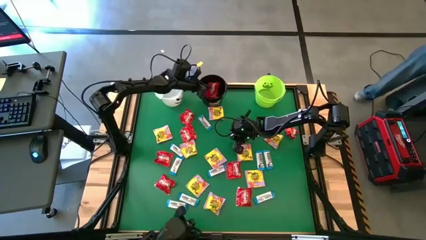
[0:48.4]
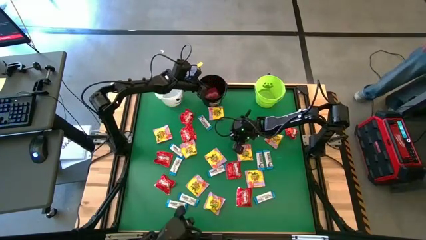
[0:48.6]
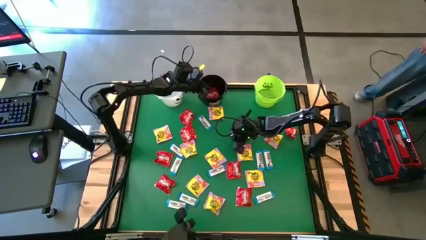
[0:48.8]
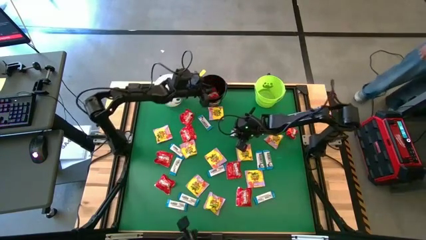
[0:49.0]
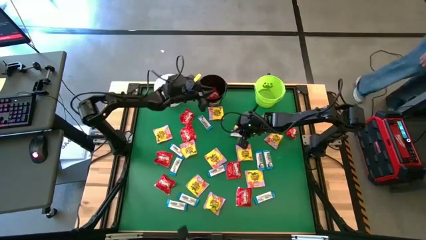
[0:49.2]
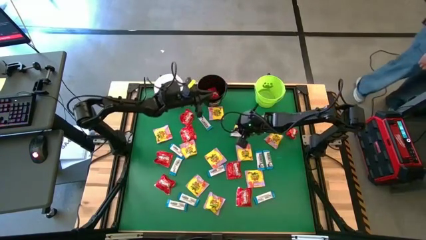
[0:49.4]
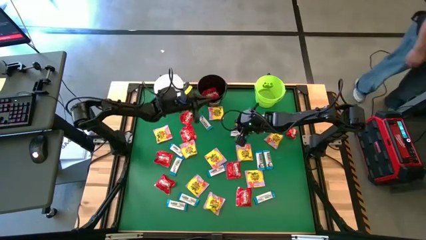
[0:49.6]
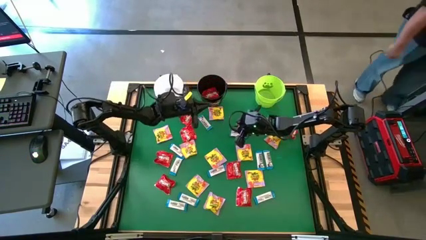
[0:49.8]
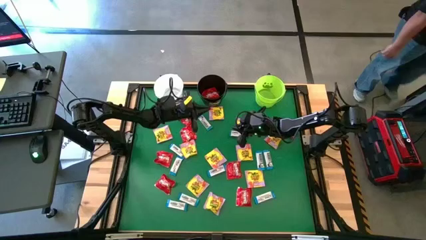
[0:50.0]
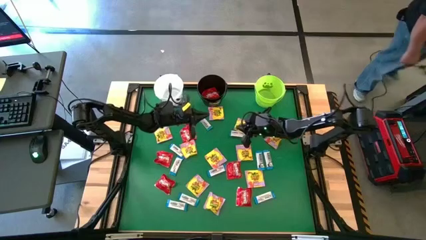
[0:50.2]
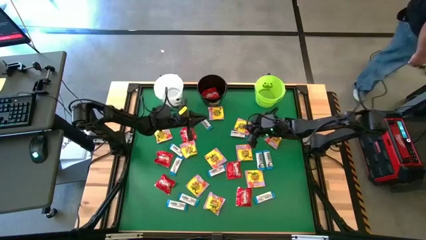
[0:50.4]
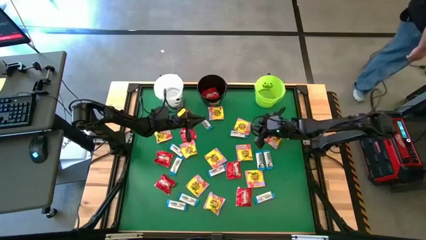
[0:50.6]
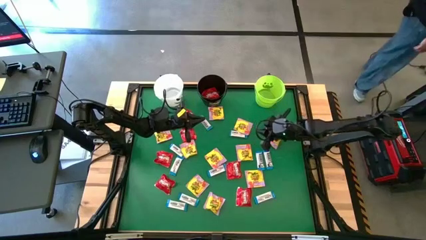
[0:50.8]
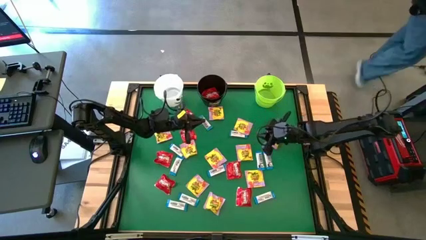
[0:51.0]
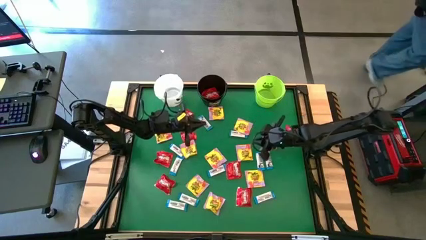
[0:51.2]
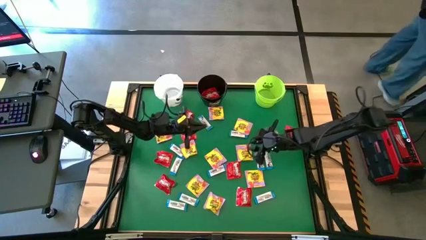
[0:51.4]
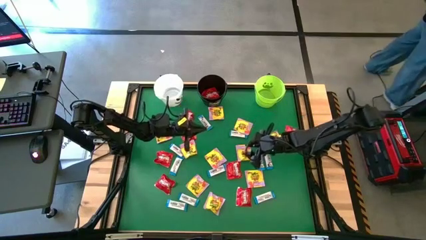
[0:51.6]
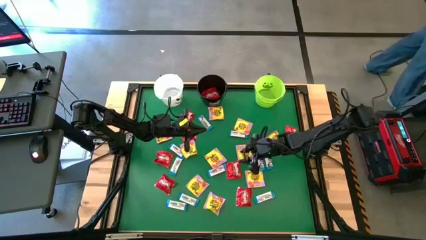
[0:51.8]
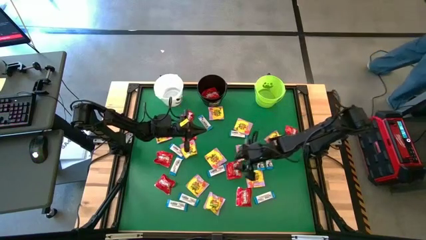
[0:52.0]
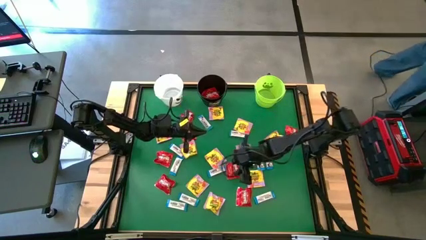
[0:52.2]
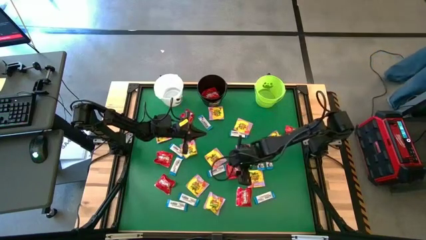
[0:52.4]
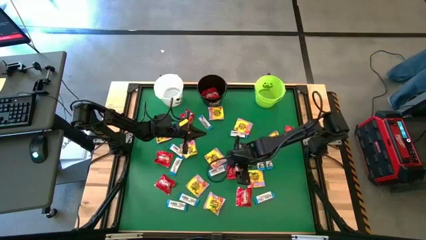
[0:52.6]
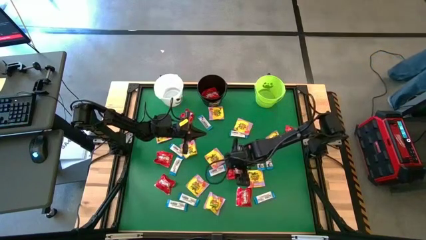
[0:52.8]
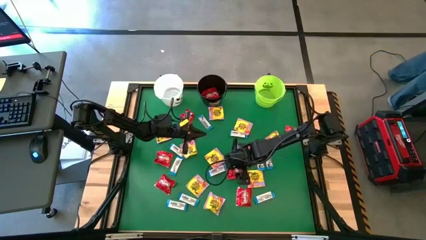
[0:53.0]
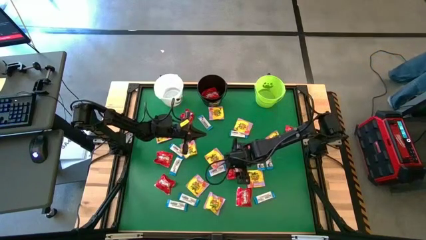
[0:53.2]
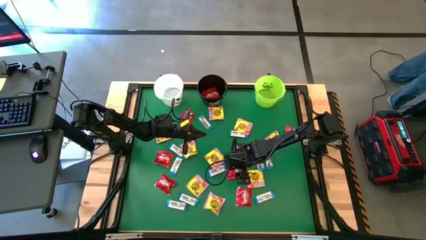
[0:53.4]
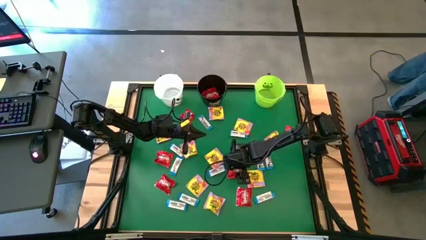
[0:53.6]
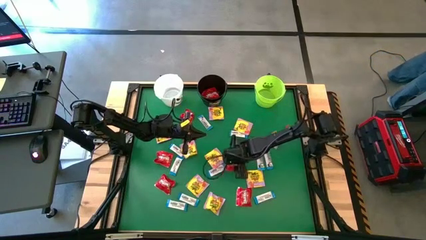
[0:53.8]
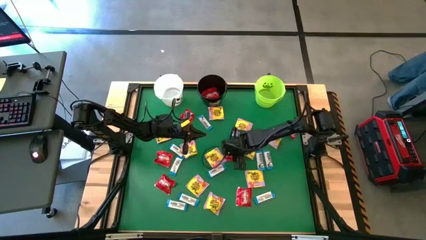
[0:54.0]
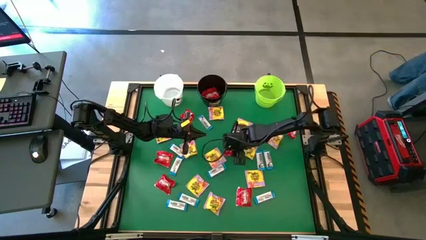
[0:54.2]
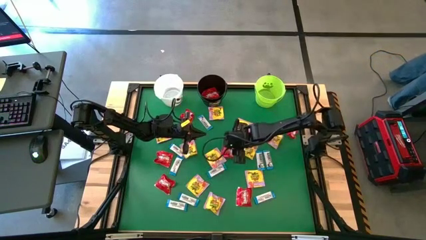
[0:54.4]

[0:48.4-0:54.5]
Task: Sort candy by brand, put in halloween buckets
Put the red candy into the black bucket

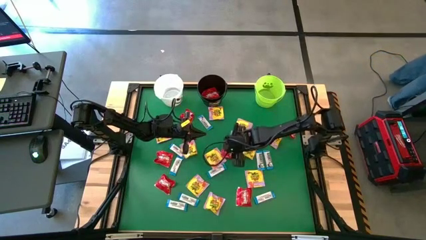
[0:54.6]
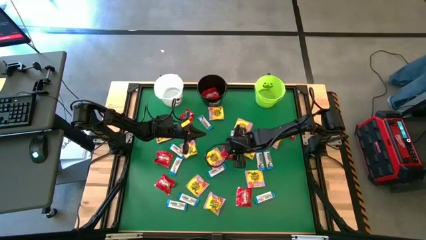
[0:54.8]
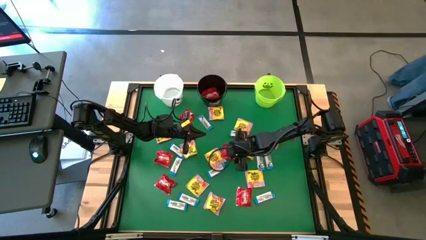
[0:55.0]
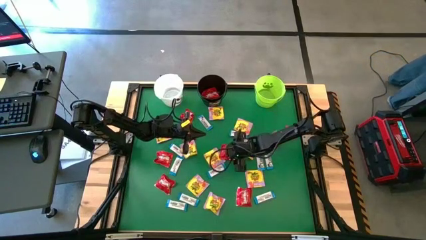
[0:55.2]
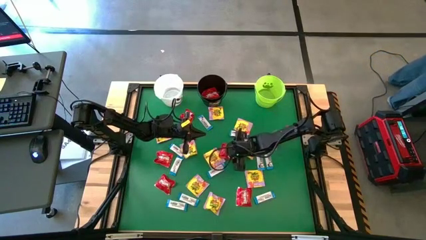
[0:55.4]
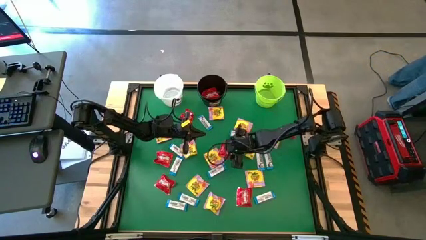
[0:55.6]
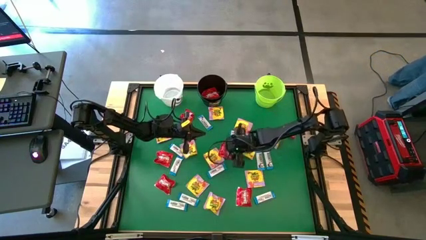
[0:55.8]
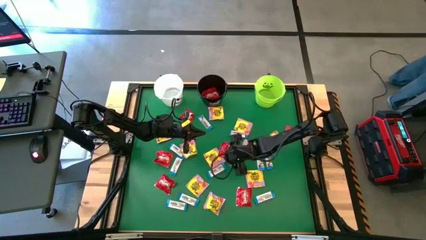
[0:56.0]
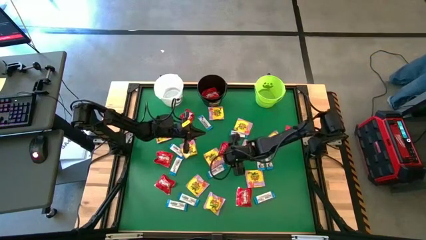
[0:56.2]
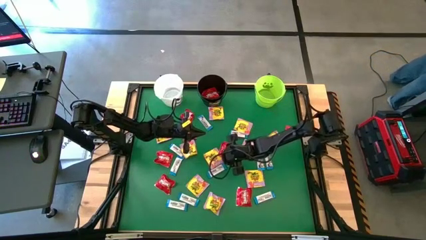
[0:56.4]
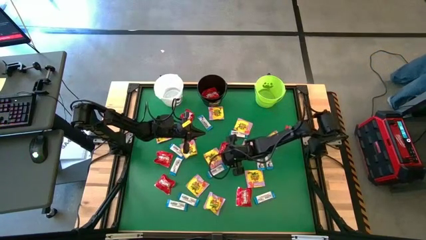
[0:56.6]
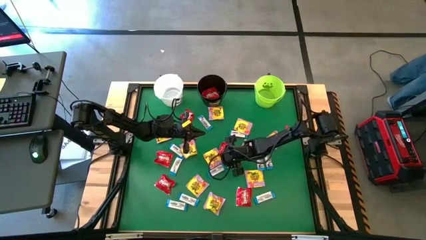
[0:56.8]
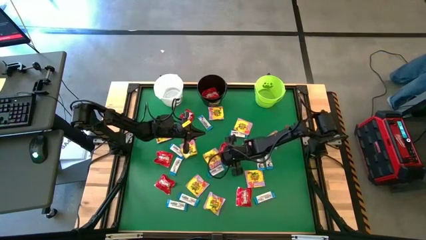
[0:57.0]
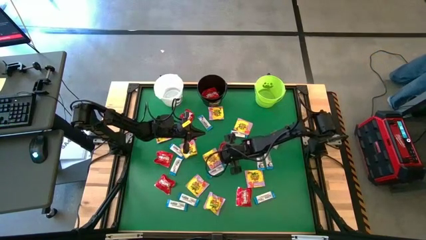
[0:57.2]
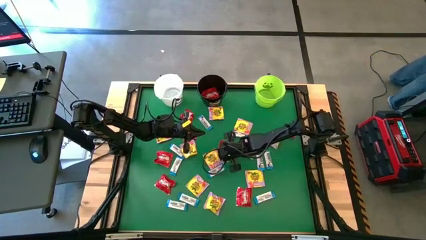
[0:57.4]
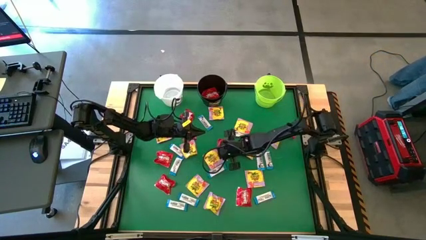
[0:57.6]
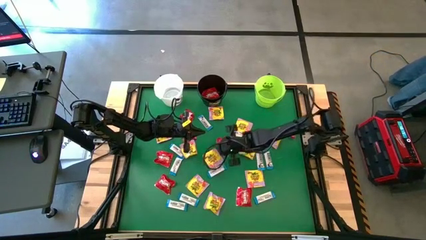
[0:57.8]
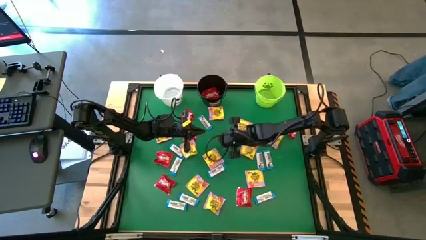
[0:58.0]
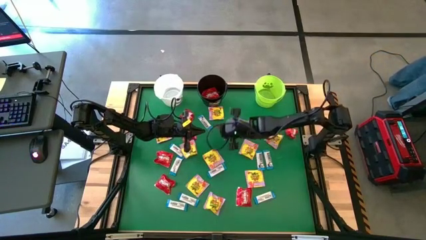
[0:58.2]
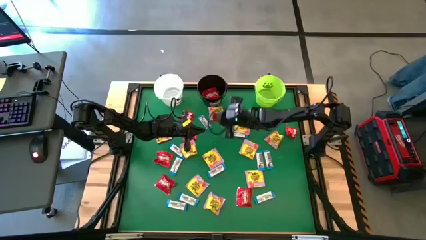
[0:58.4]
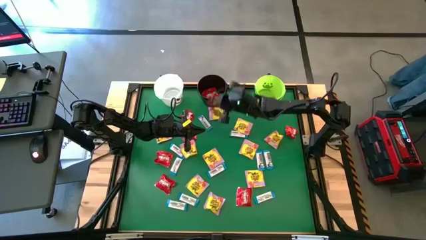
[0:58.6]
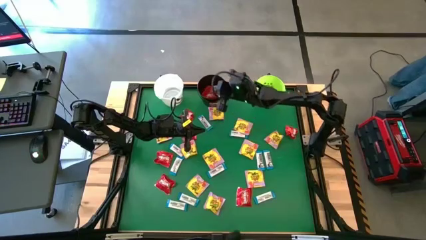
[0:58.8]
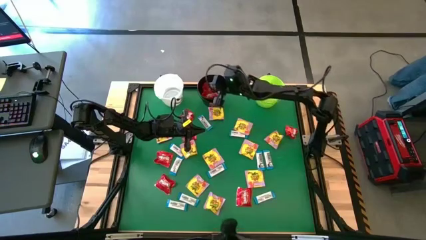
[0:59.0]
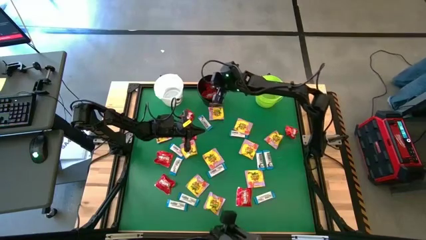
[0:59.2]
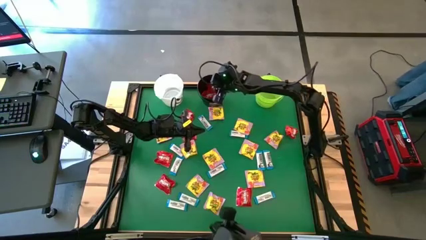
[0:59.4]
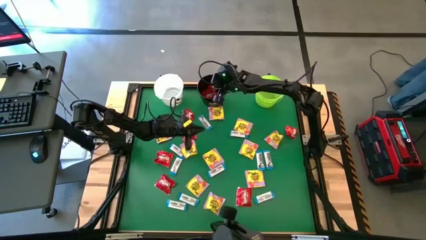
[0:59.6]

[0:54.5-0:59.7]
Put the red candy into the black bucket

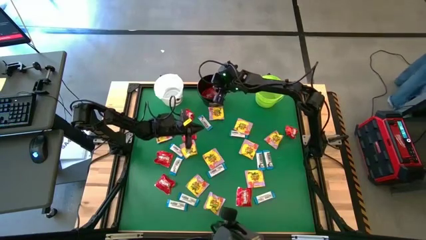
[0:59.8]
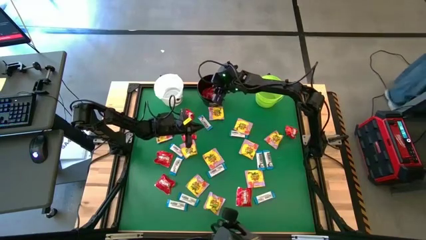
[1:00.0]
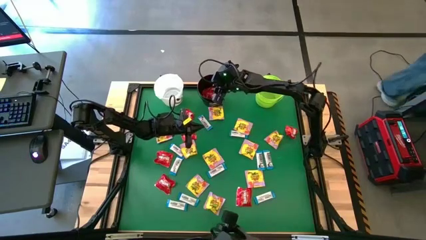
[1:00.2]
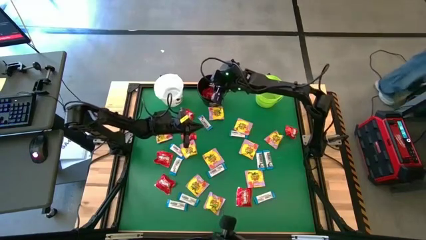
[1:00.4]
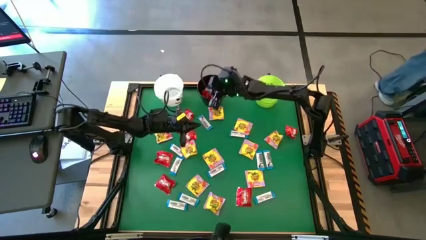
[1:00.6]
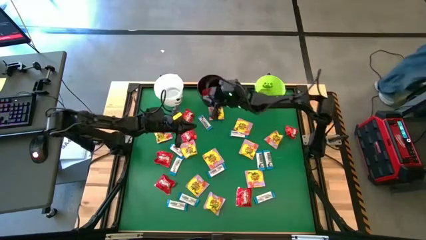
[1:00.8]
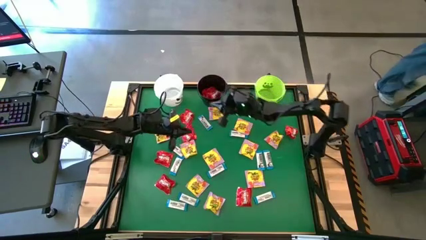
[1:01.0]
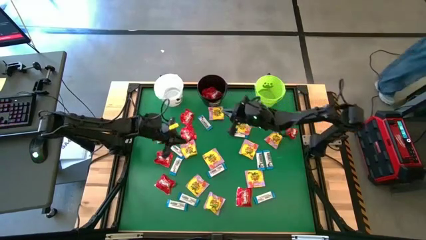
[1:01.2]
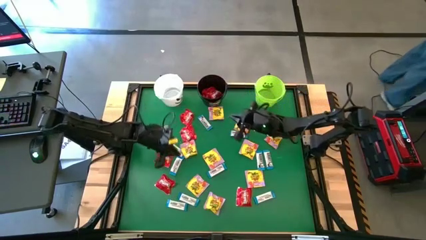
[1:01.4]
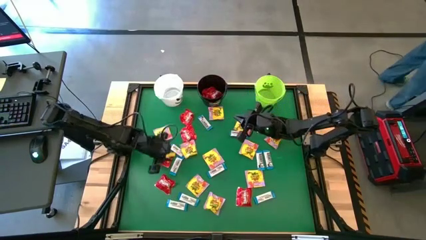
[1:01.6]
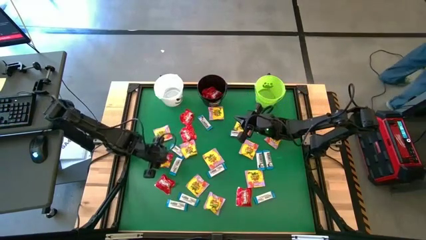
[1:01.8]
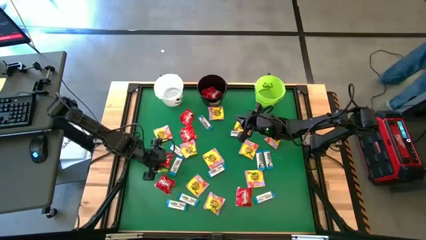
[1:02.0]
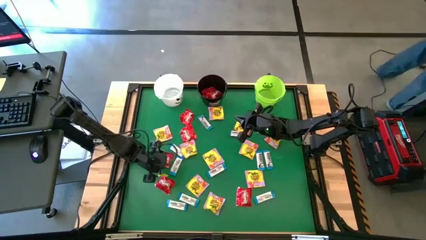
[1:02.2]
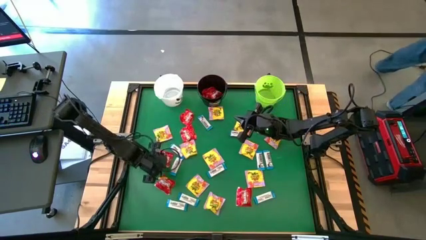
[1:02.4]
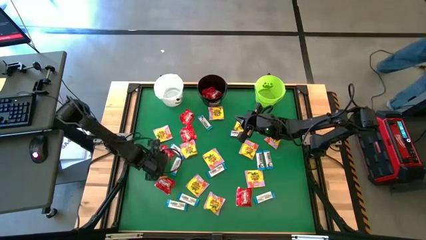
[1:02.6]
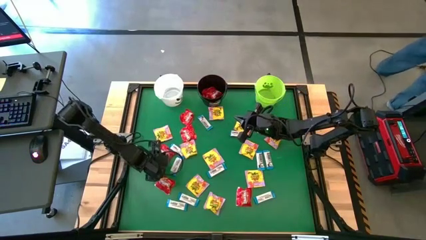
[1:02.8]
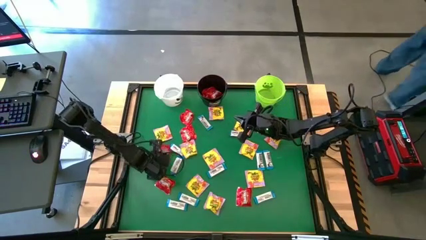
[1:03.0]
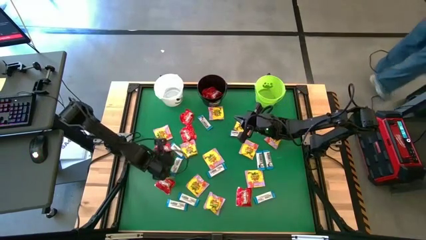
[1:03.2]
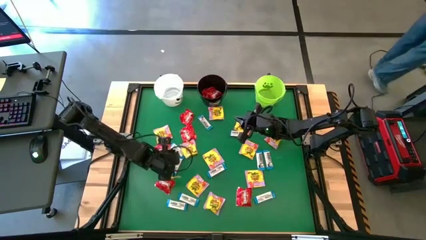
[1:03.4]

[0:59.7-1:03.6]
Put the red candy into the black bucket

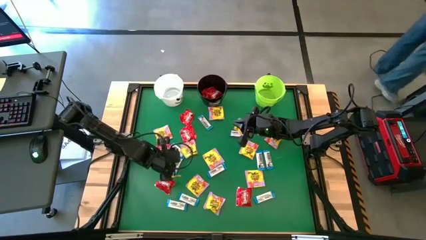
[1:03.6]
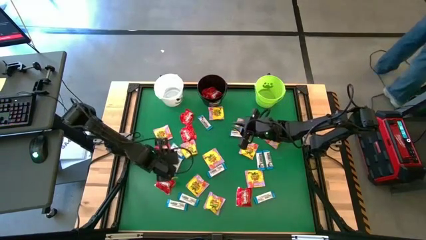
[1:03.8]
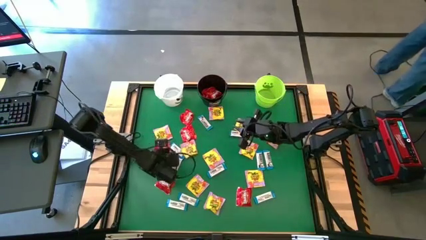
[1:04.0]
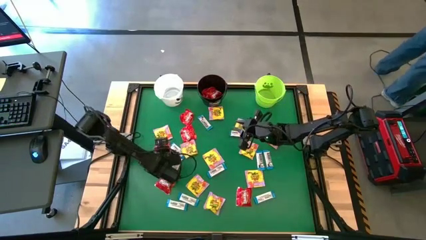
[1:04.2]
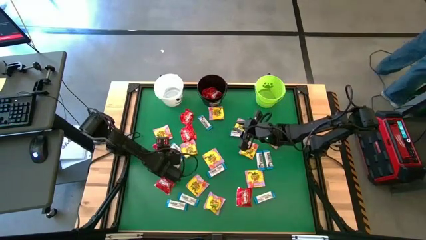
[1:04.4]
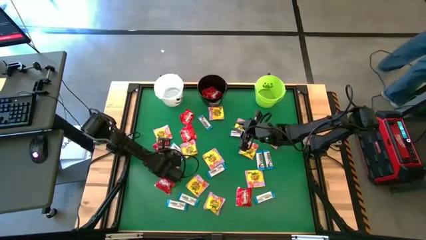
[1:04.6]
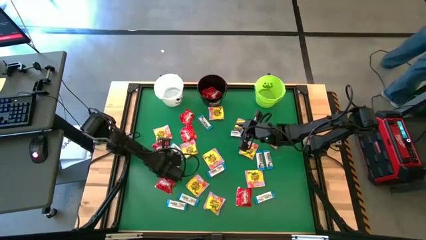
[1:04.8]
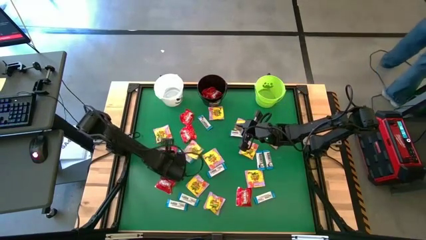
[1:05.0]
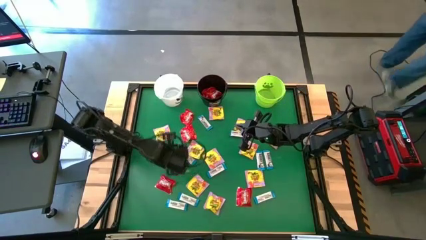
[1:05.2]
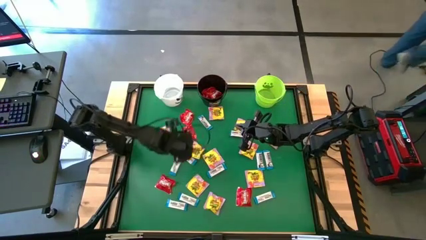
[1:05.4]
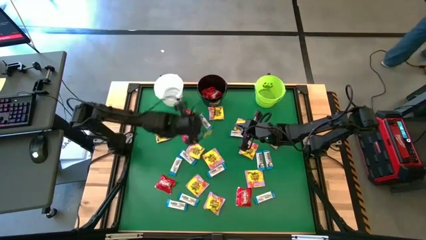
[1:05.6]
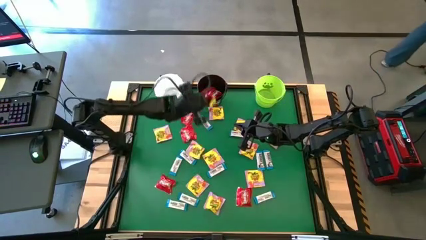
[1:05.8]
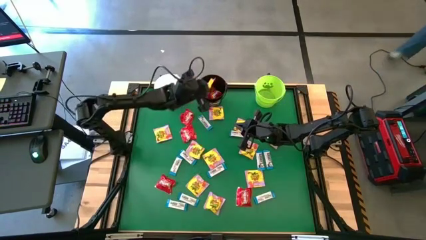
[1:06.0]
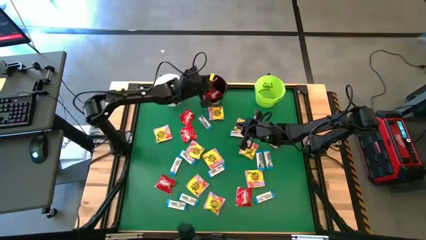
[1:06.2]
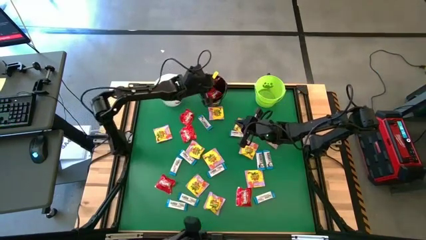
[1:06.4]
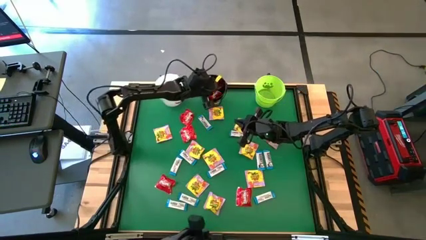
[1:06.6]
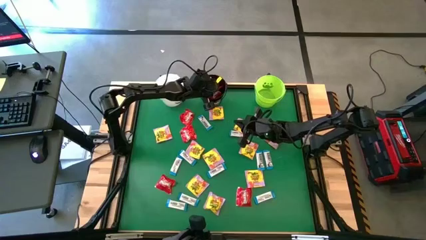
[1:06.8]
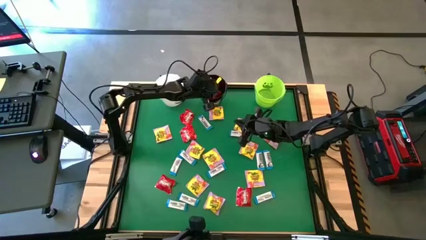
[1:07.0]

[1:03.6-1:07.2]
Put the red candy into the black bucket
